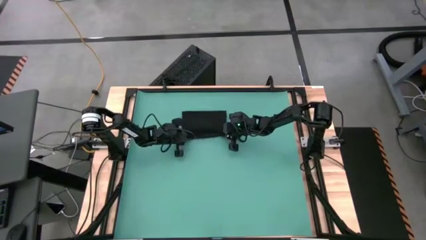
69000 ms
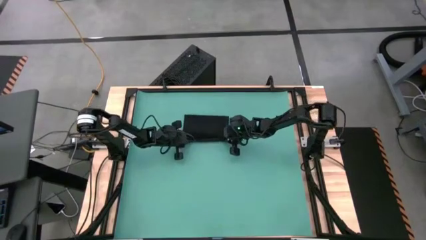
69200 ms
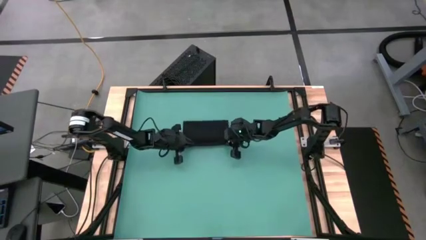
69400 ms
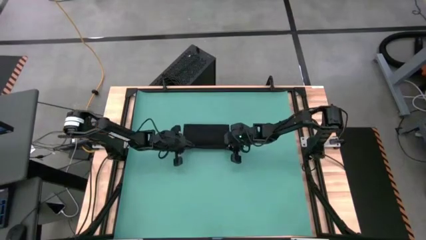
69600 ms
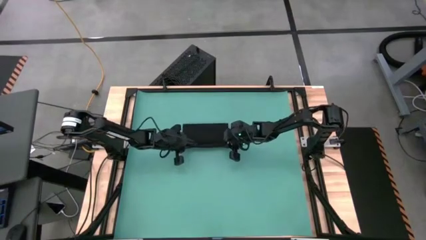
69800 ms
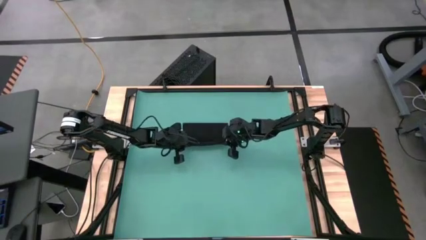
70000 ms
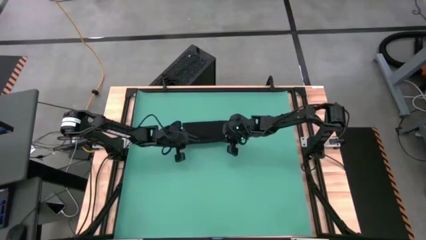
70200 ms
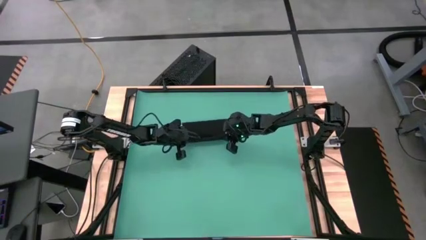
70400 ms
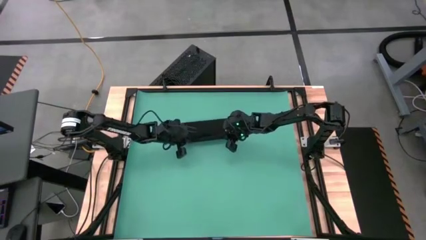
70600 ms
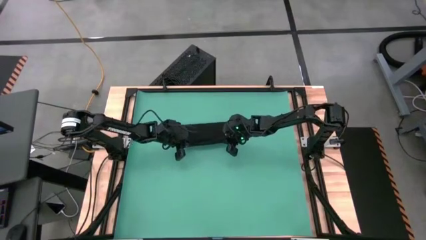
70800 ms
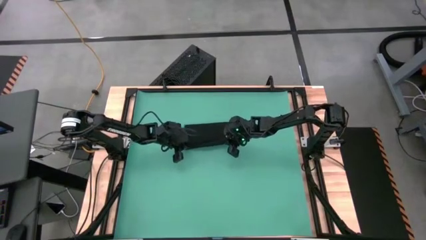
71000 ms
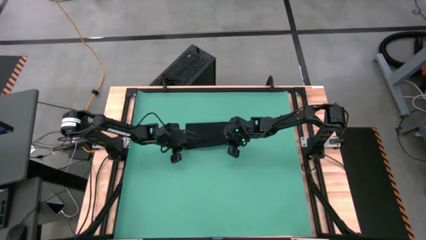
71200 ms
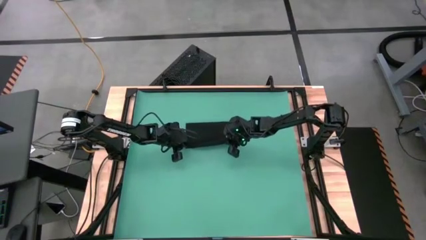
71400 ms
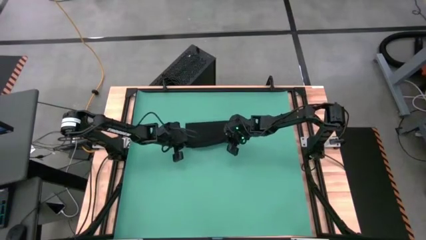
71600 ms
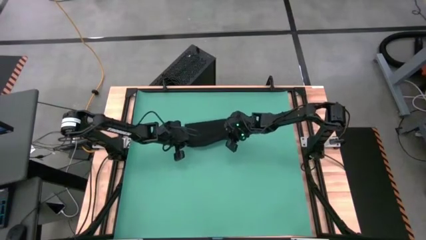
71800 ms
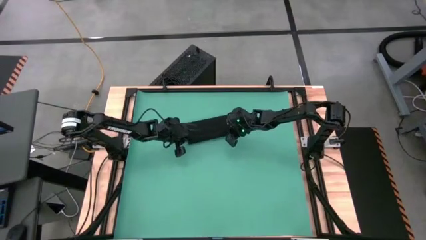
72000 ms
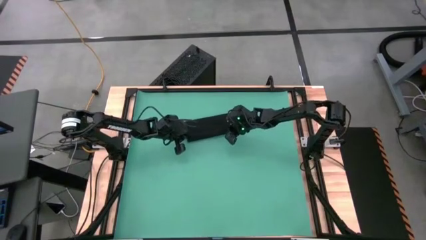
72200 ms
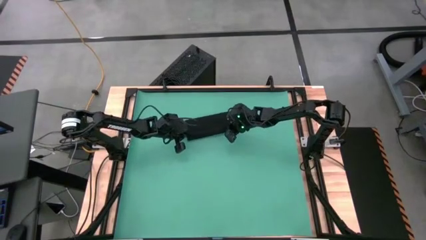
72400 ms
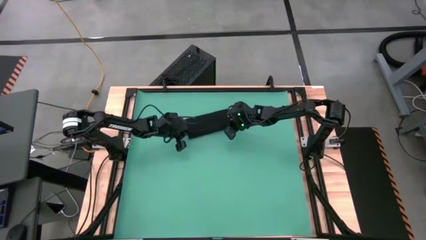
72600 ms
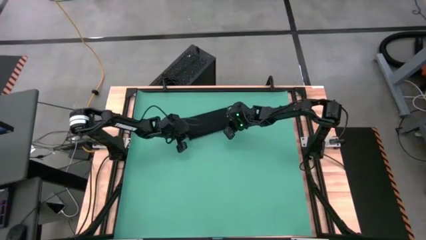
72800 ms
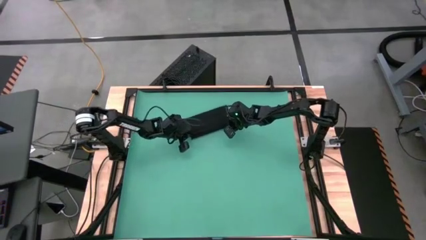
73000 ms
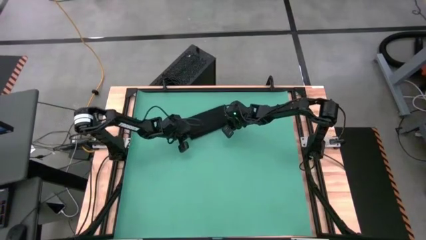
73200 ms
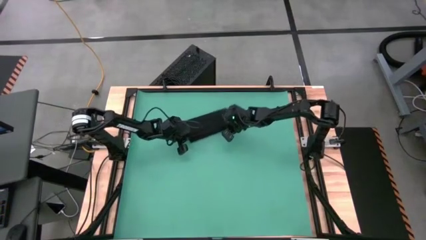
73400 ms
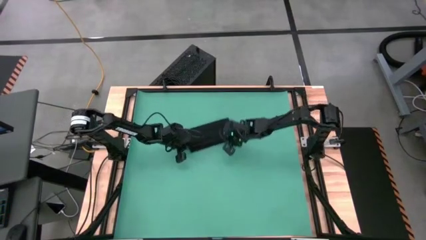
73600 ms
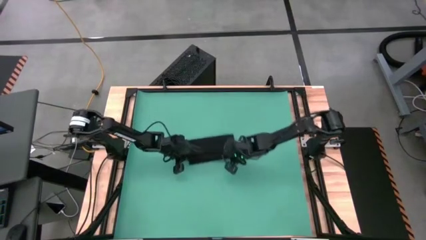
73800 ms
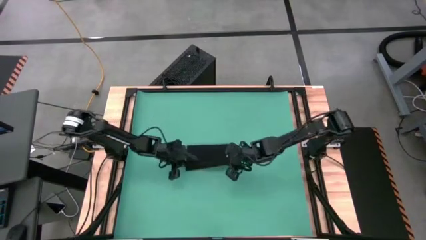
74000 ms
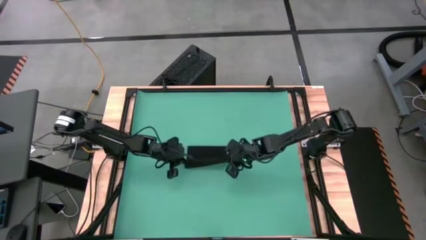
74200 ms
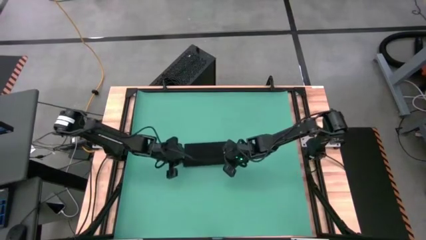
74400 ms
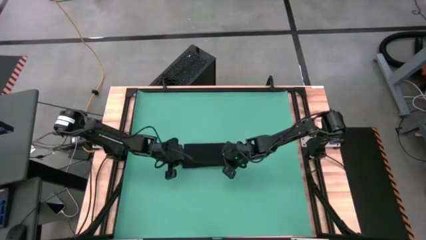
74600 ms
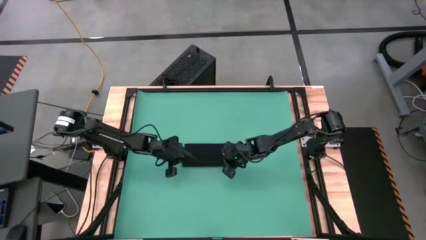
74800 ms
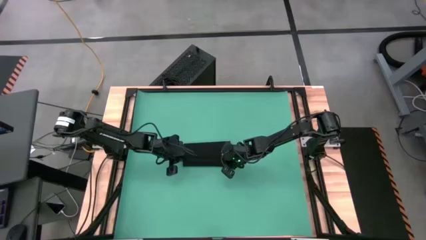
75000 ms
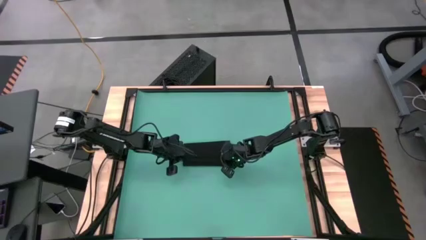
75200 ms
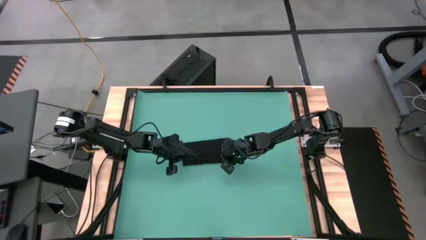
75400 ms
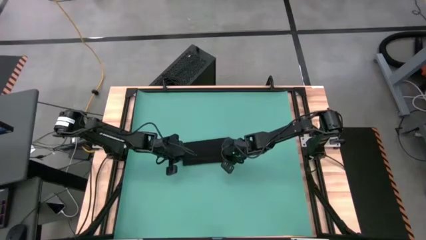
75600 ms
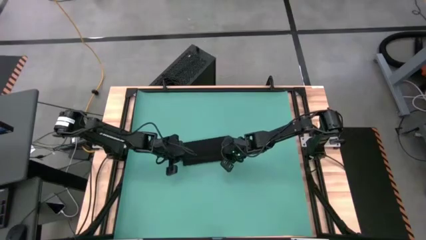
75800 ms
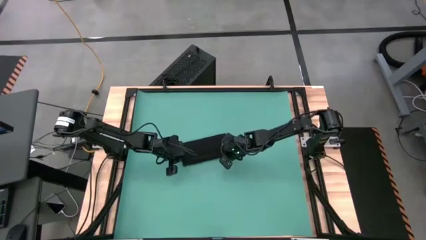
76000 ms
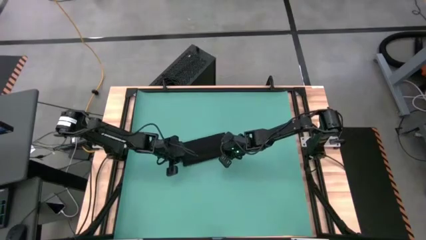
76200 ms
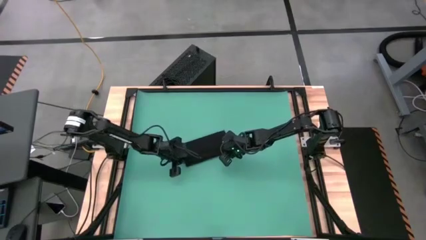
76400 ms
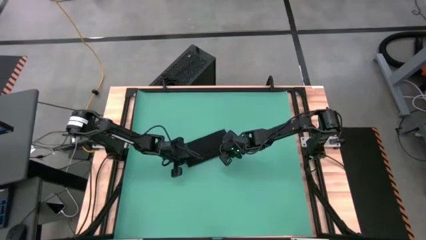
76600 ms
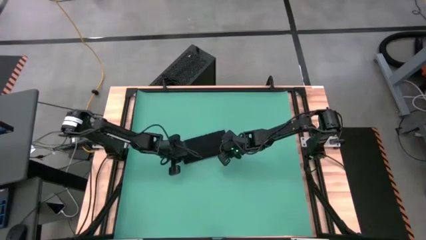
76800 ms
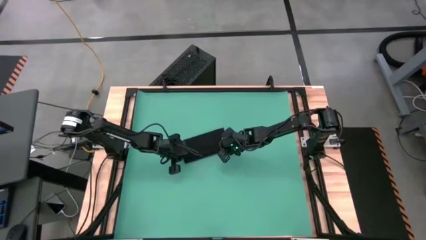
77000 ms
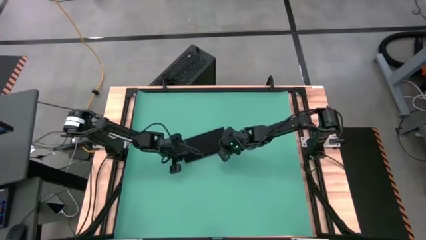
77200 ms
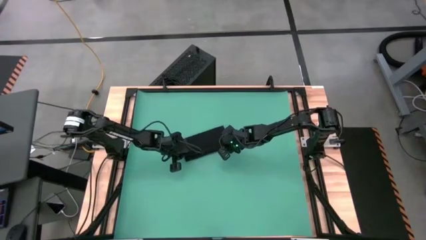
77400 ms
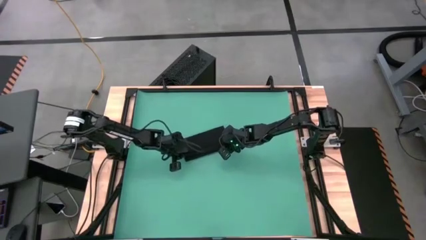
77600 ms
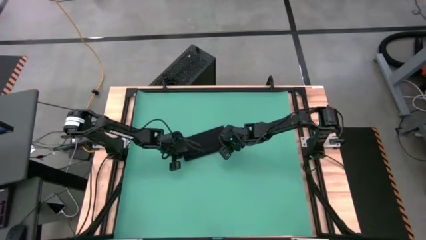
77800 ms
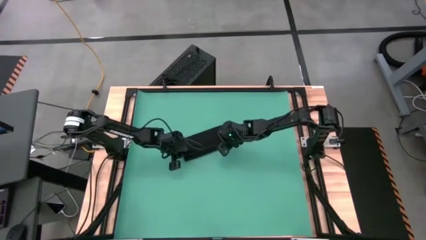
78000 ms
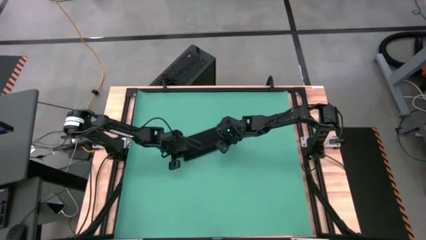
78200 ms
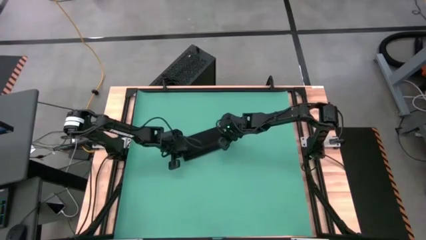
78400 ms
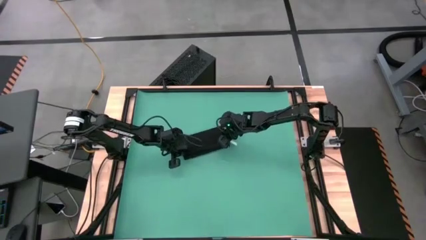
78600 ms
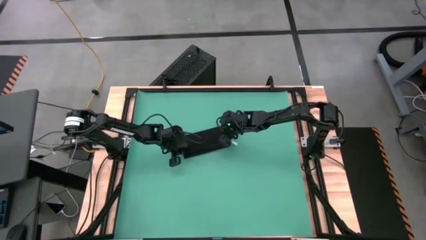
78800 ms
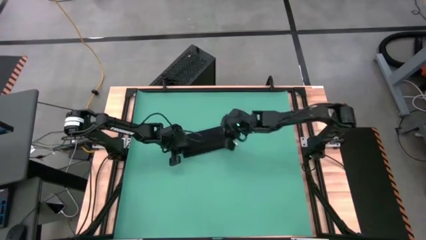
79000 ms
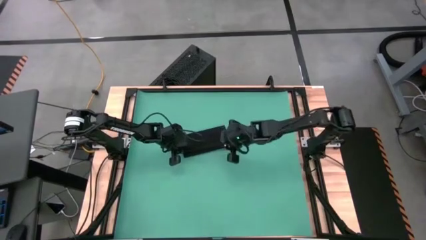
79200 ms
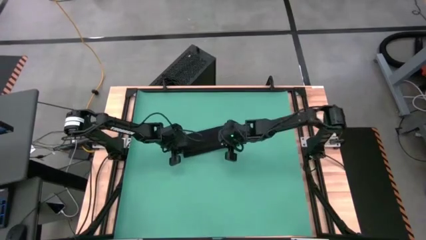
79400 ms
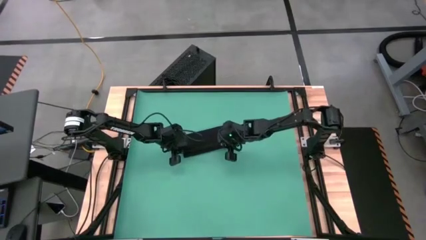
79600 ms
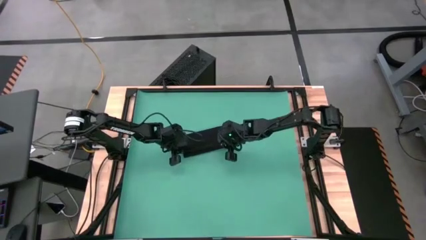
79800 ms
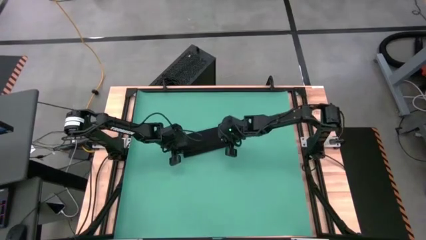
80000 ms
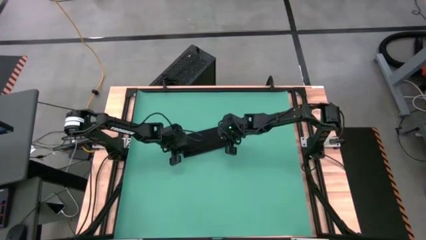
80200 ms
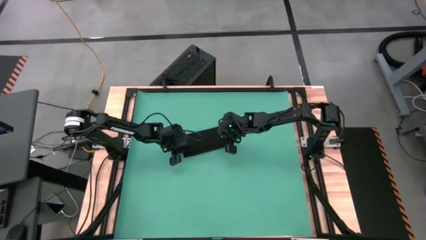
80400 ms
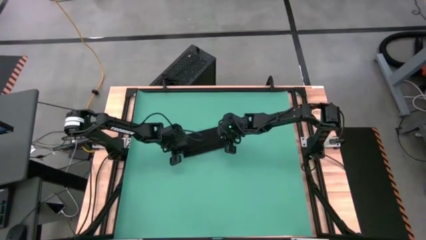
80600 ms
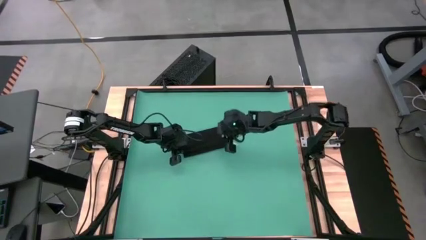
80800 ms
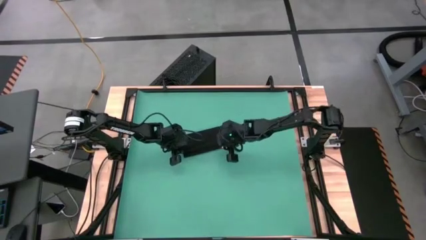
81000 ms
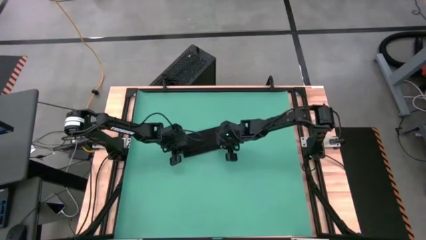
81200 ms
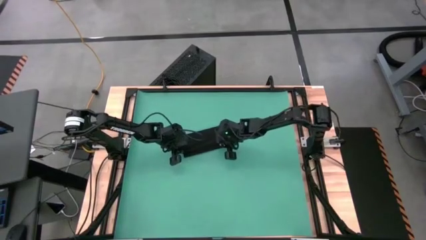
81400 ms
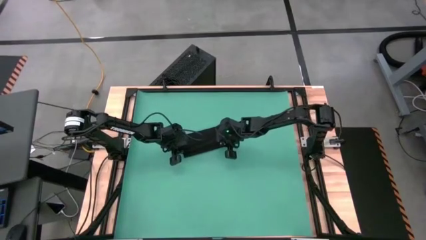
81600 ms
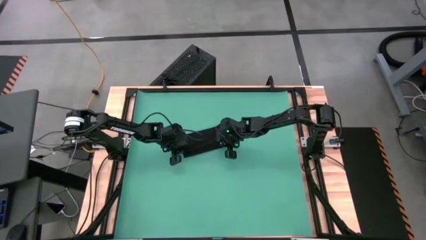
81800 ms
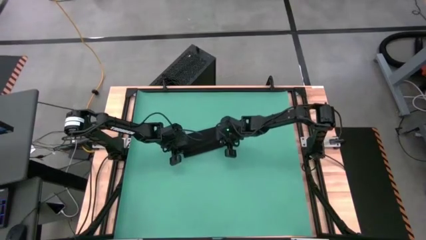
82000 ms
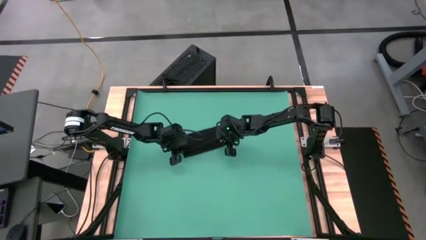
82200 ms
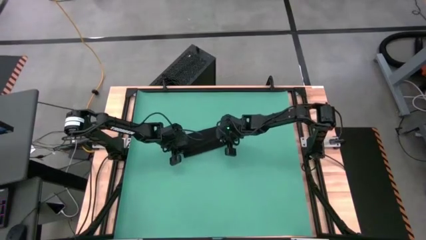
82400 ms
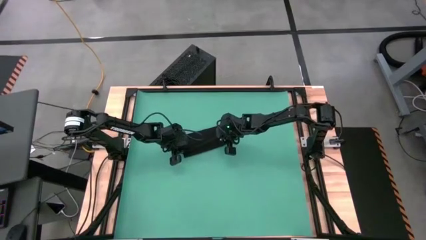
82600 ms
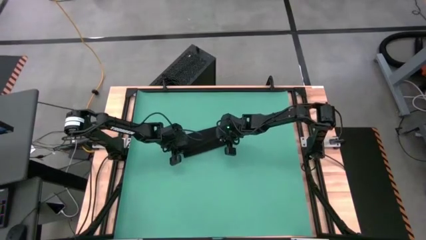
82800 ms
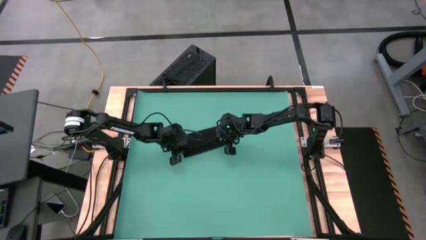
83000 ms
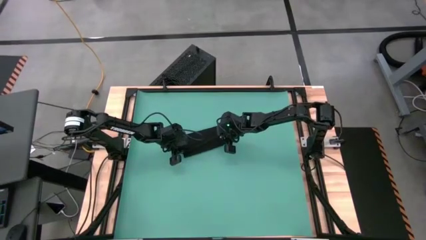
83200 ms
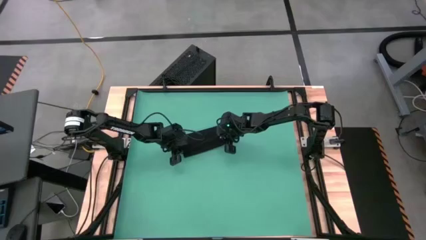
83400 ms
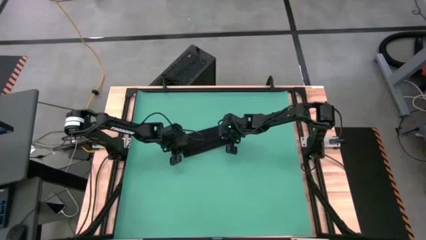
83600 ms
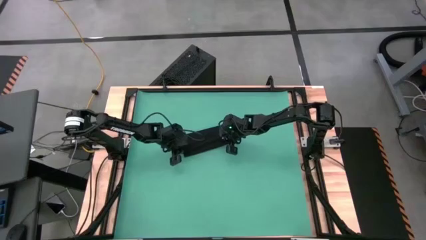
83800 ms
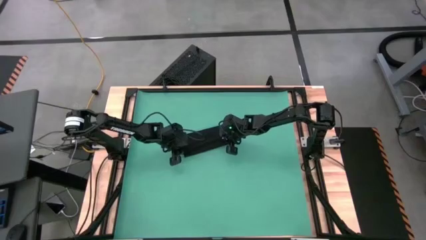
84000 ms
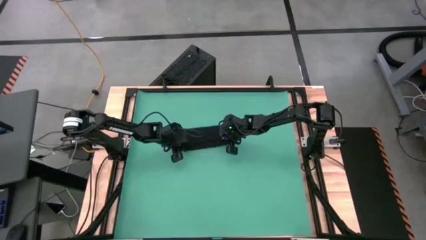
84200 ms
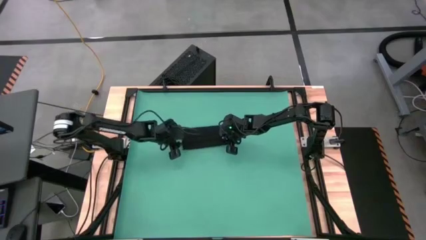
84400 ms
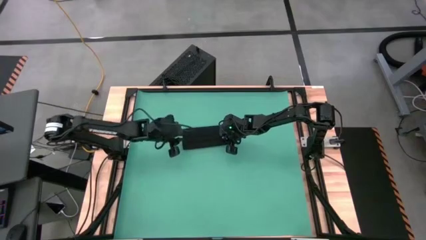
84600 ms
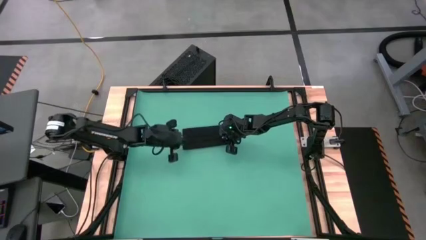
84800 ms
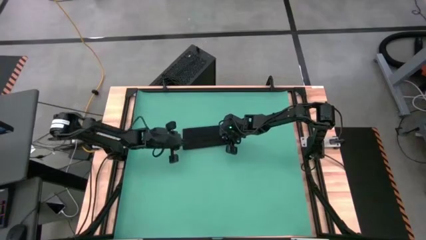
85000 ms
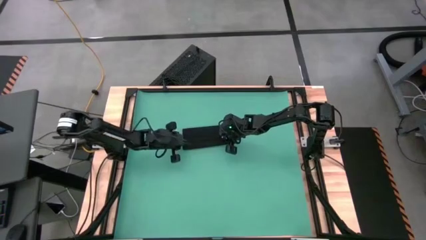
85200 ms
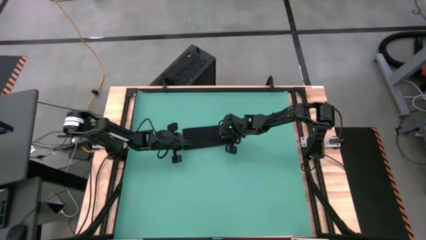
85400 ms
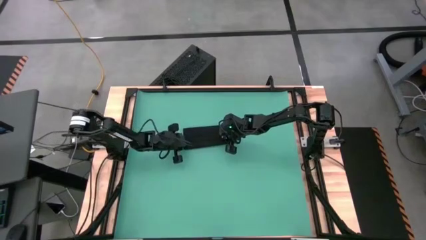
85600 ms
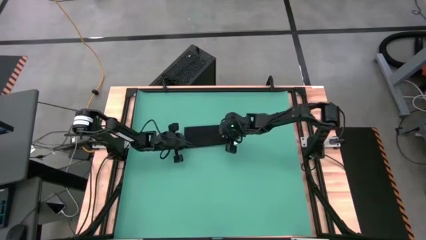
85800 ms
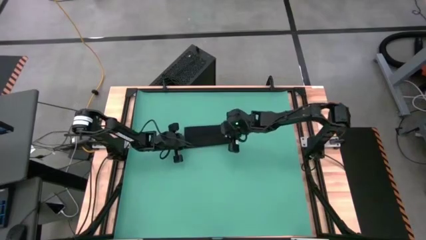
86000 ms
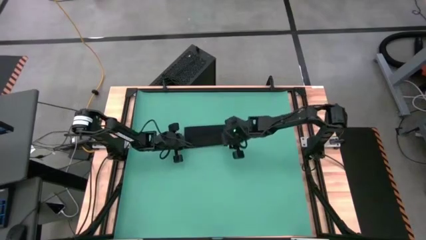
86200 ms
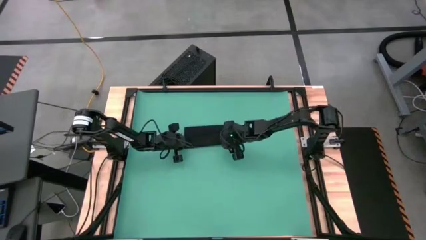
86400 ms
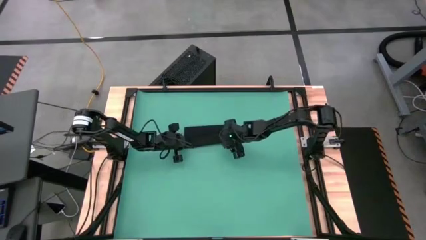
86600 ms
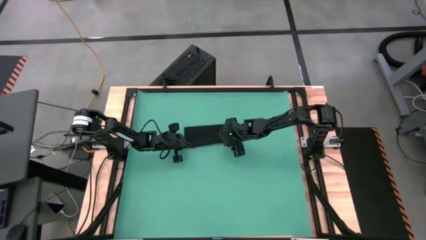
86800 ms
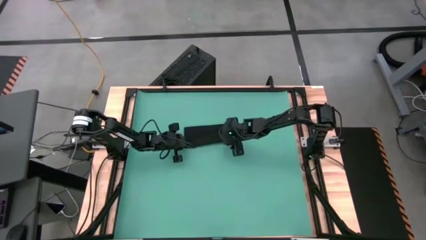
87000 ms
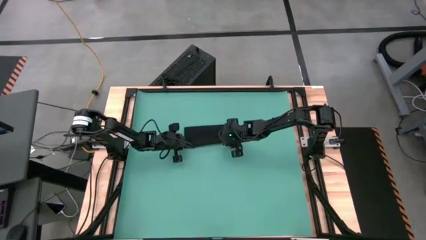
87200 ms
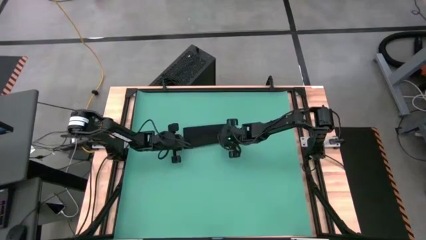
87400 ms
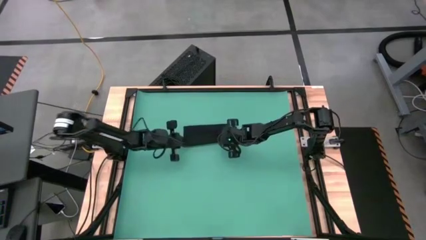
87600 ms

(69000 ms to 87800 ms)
Task: Roll napkin
Roll the black table napkin
